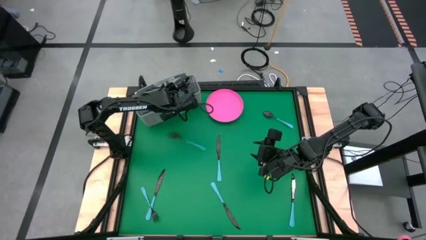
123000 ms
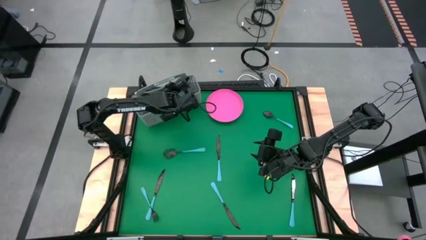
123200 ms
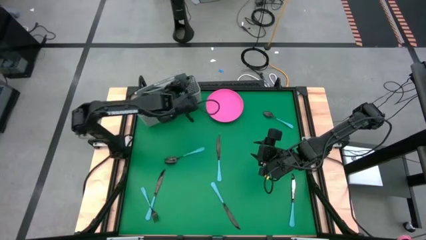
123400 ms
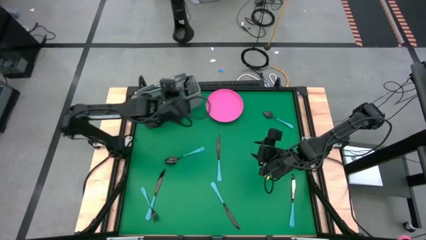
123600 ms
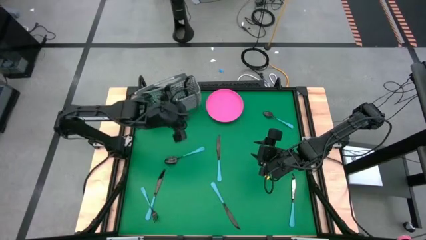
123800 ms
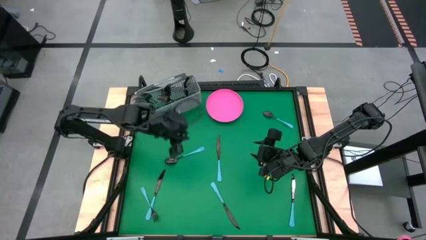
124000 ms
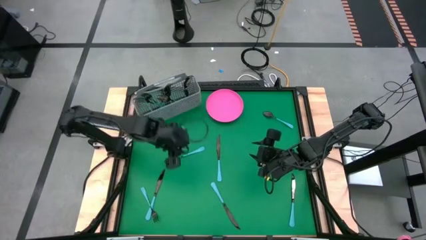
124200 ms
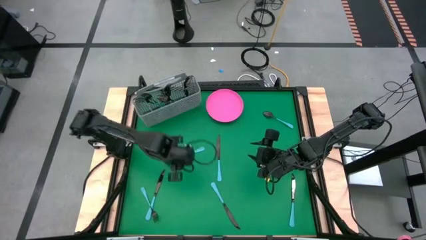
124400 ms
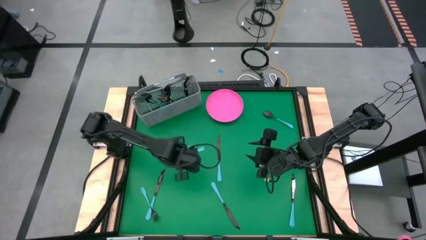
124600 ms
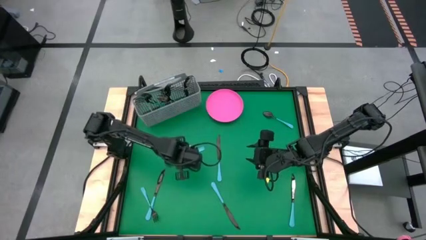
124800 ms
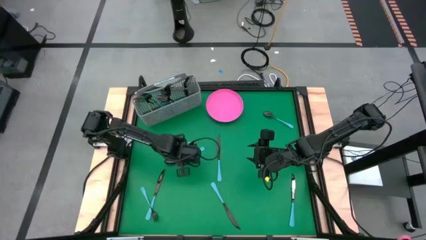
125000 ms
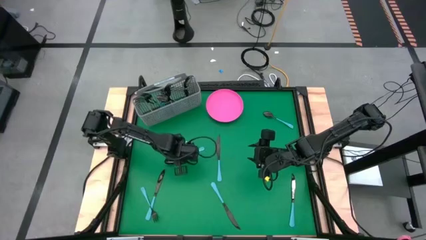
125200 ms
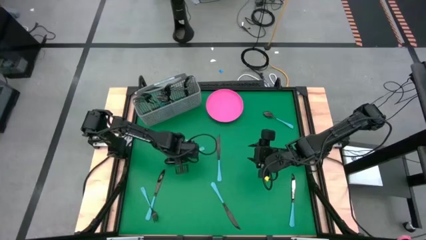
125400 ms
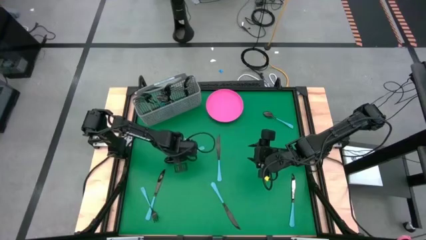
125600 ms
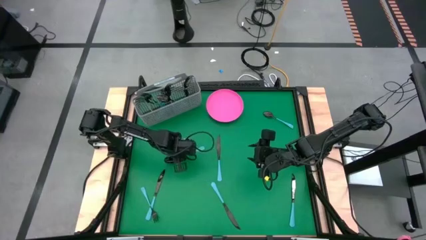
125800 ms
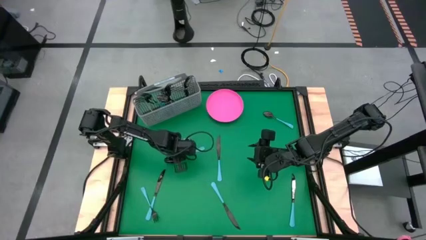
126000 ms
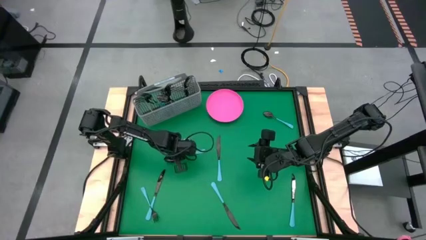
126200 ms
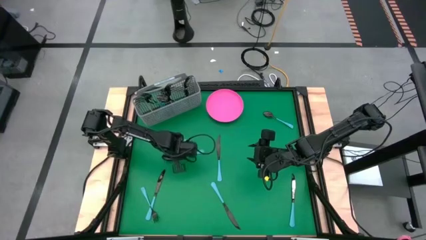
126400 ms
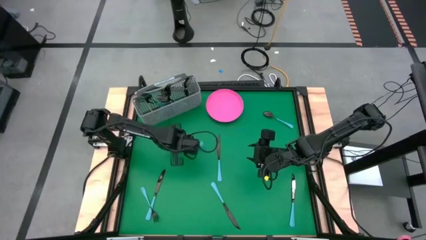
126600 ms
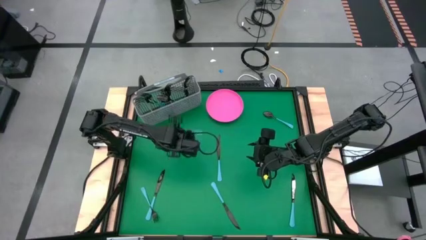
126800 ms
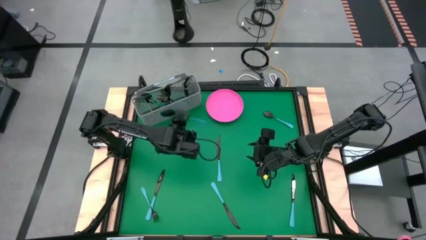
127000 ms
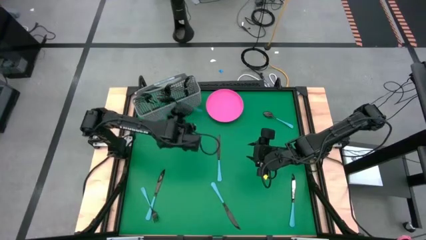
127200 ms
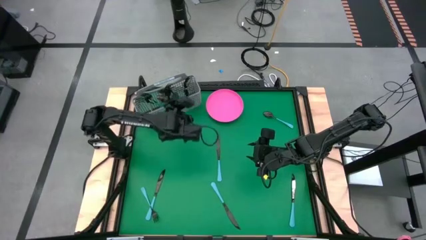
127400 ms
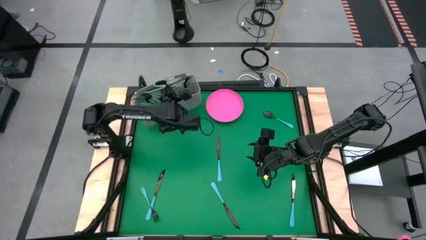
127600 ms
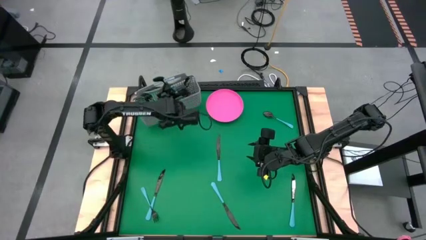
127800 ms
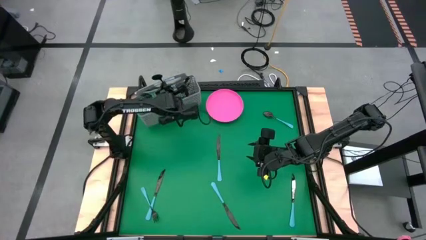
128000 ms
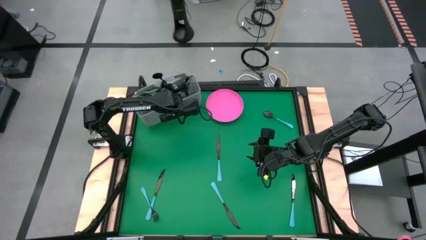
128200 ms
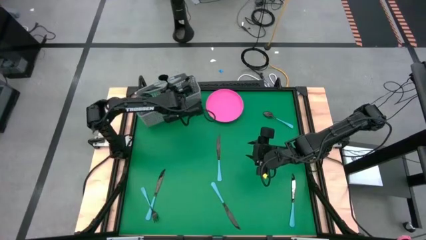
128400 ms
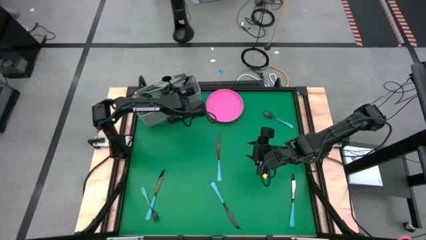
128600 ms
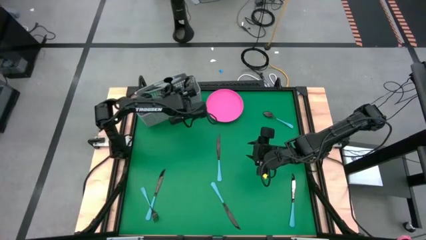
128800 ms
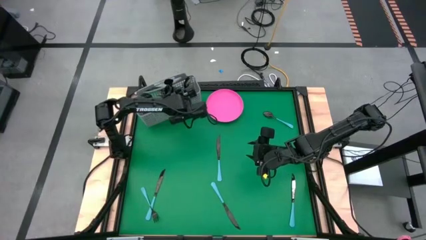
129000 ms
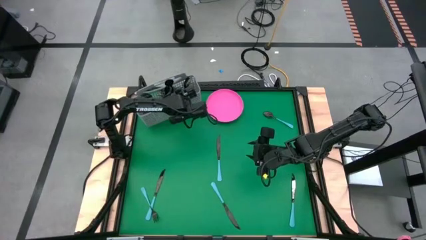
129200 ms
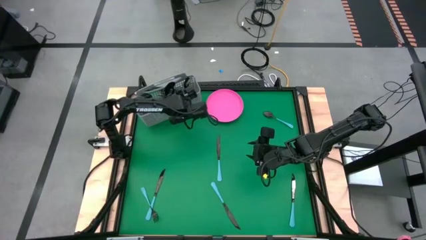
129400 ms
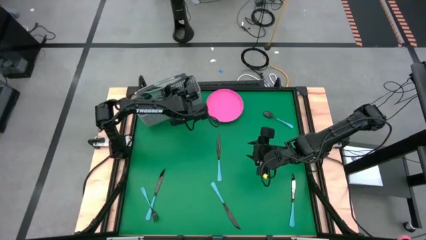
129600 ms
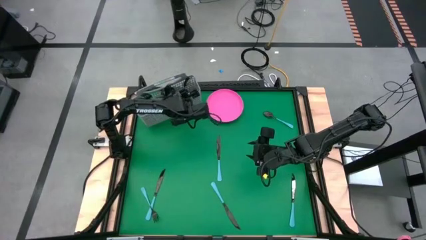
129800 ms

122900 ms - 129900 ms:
Task: Sort silverware
Put the blue spoon into the gray silverware holder

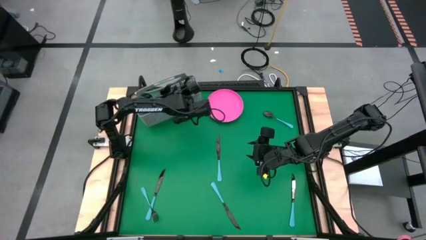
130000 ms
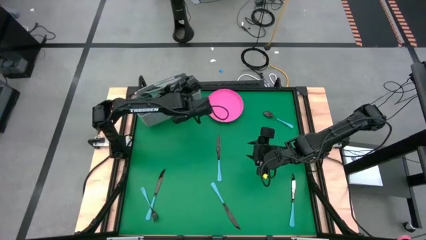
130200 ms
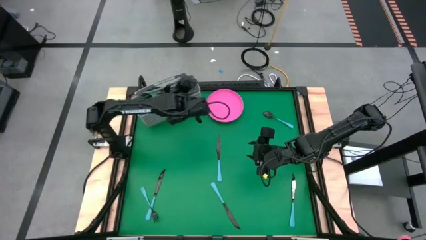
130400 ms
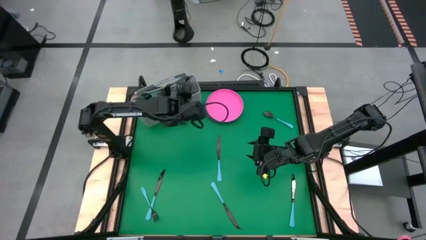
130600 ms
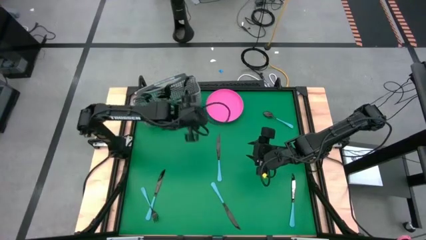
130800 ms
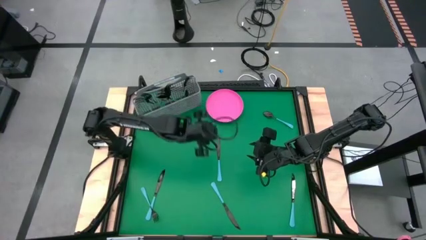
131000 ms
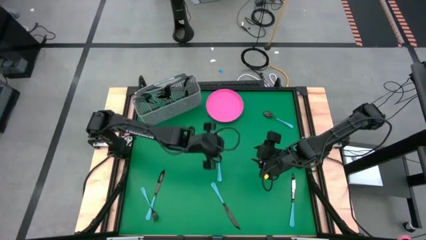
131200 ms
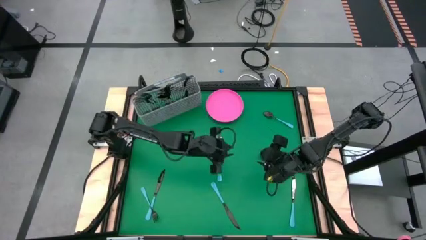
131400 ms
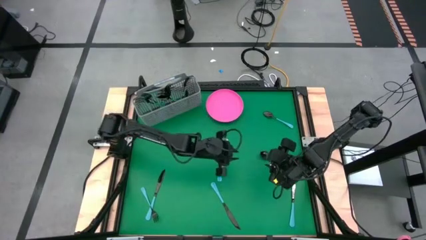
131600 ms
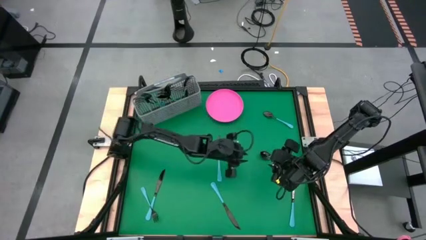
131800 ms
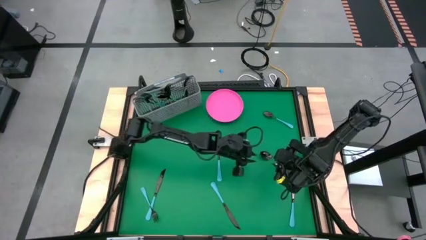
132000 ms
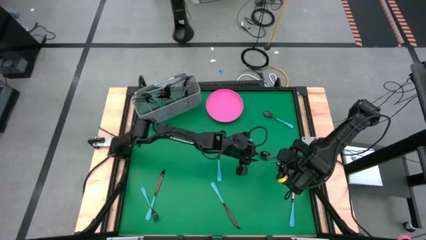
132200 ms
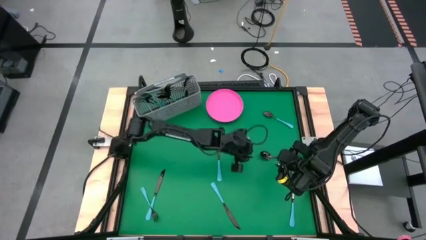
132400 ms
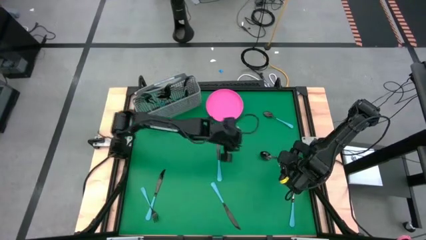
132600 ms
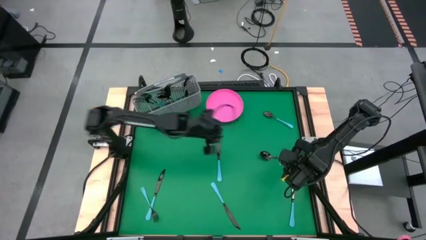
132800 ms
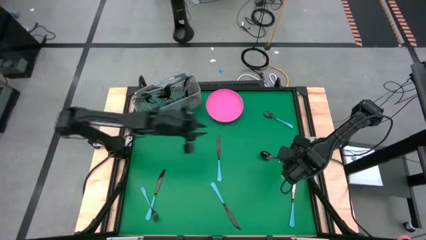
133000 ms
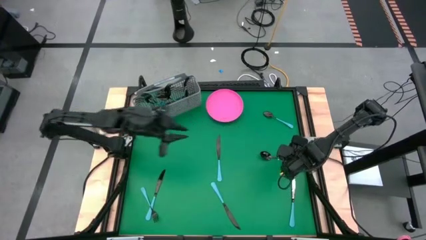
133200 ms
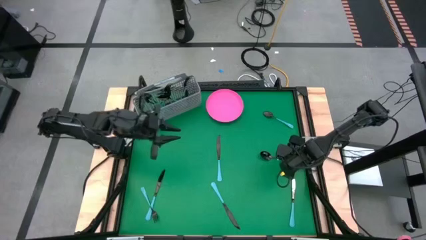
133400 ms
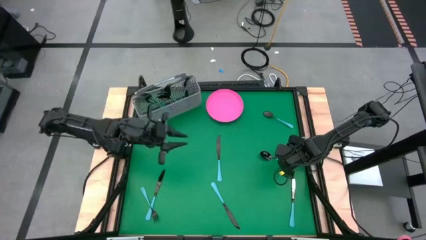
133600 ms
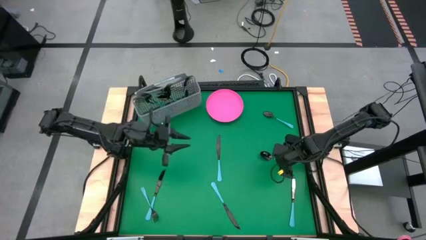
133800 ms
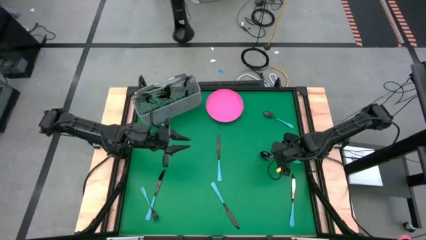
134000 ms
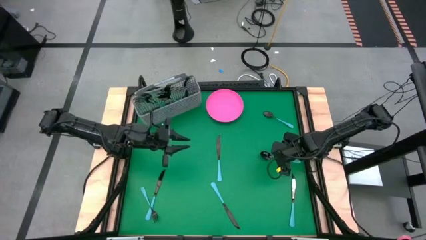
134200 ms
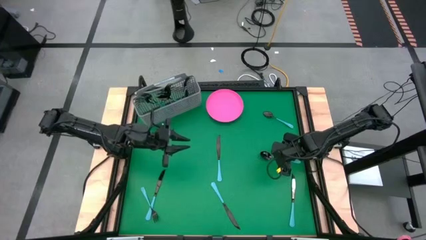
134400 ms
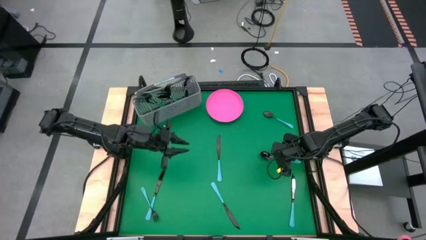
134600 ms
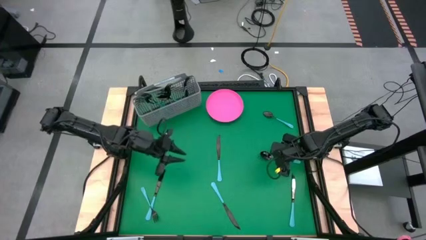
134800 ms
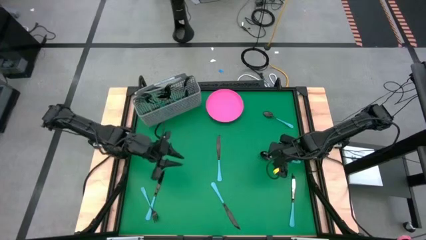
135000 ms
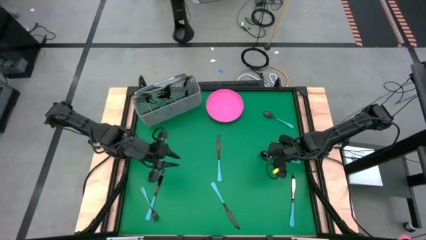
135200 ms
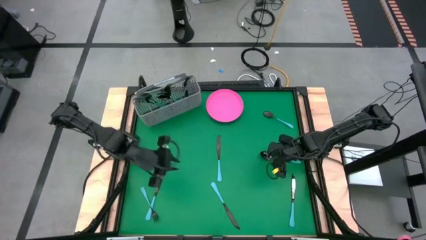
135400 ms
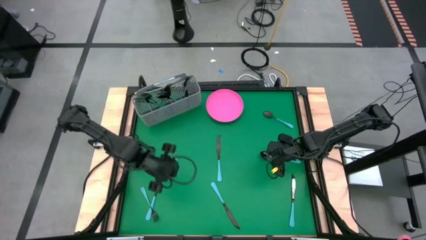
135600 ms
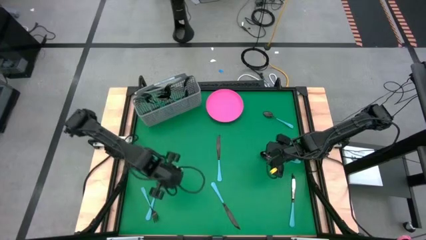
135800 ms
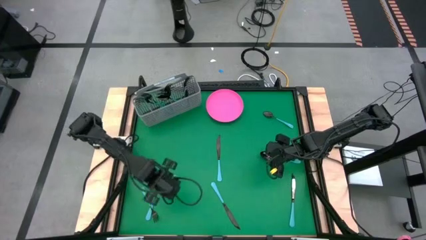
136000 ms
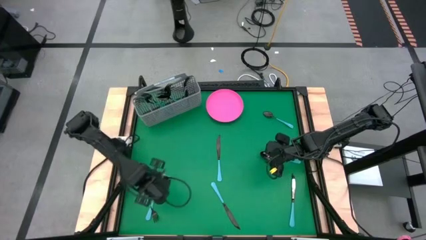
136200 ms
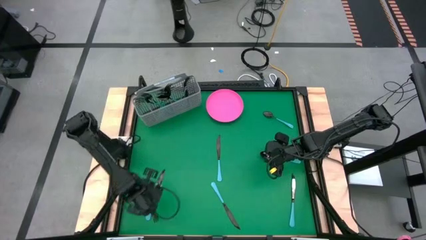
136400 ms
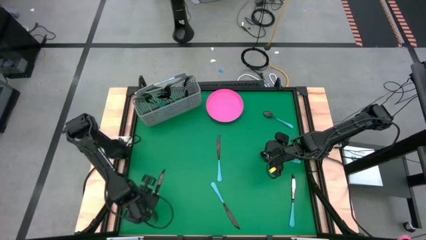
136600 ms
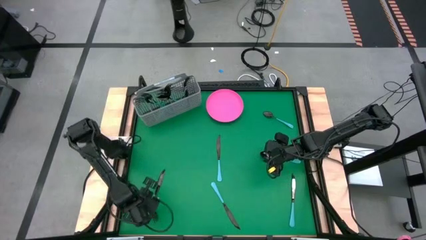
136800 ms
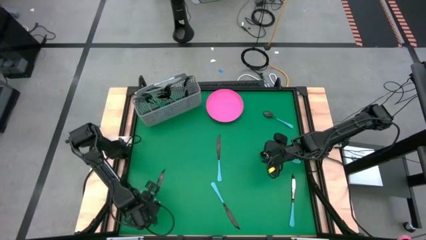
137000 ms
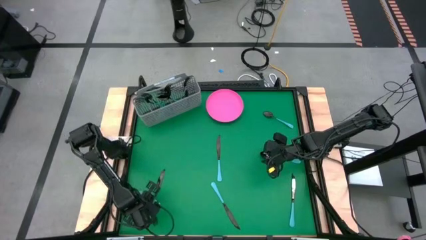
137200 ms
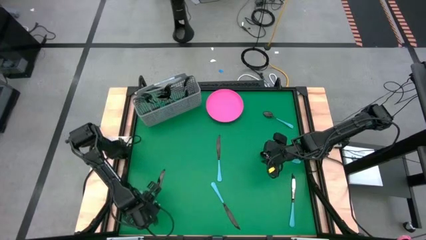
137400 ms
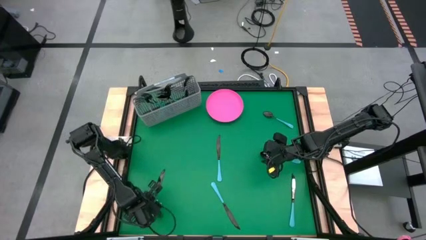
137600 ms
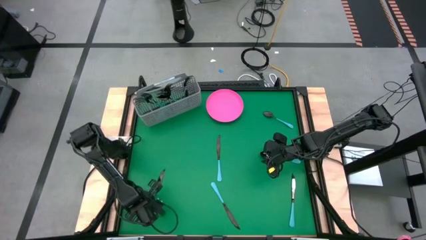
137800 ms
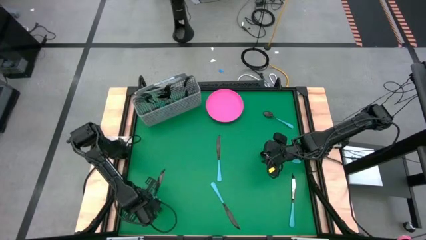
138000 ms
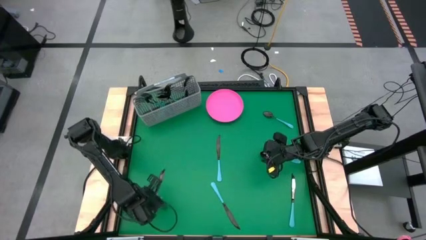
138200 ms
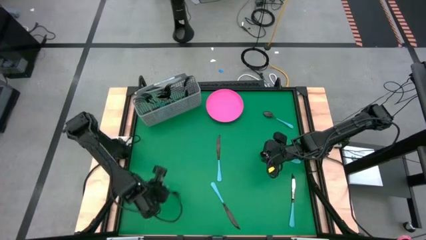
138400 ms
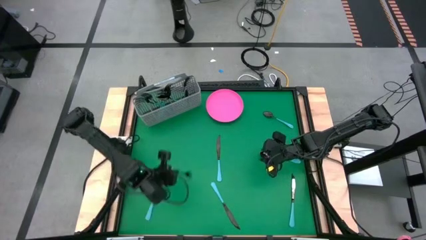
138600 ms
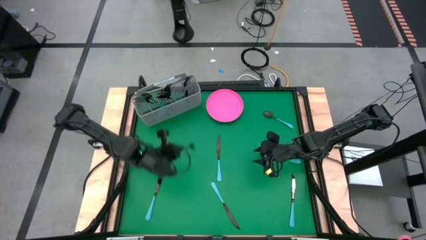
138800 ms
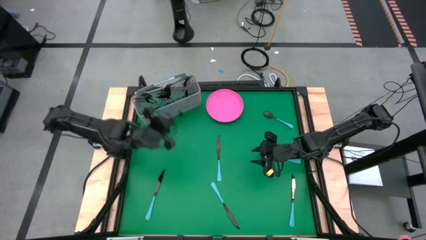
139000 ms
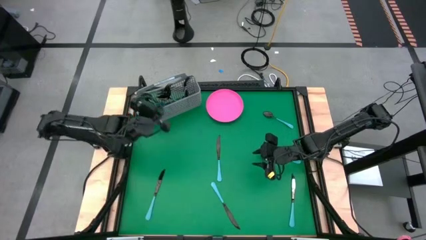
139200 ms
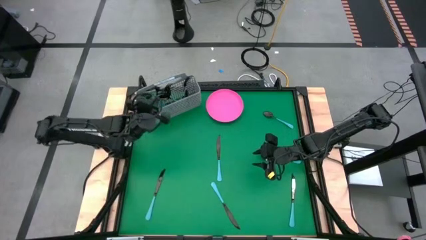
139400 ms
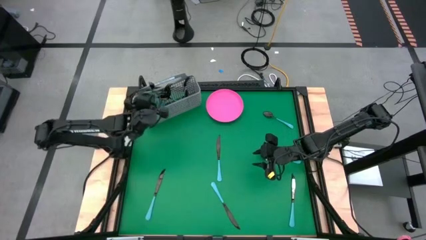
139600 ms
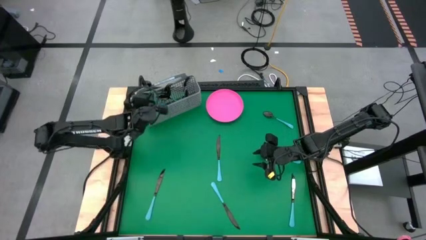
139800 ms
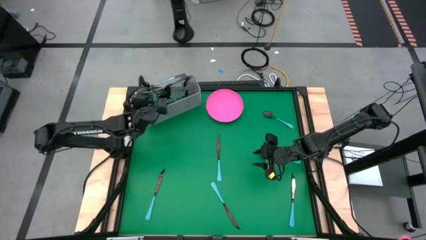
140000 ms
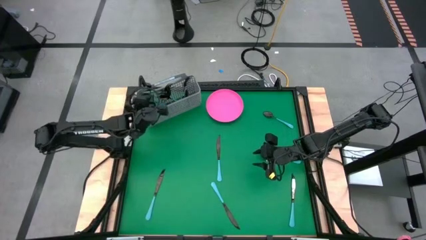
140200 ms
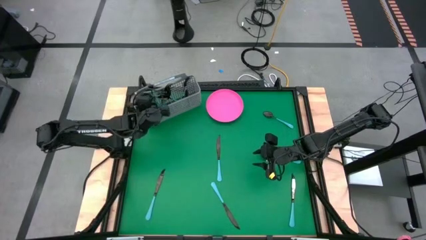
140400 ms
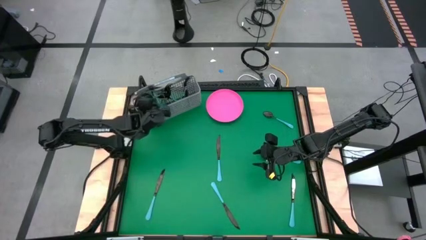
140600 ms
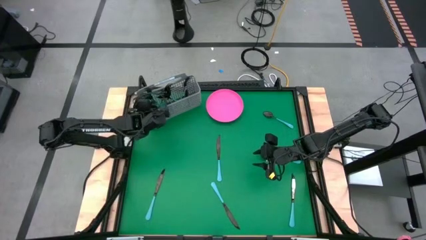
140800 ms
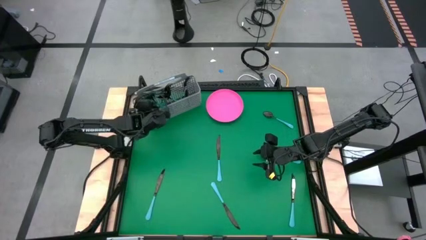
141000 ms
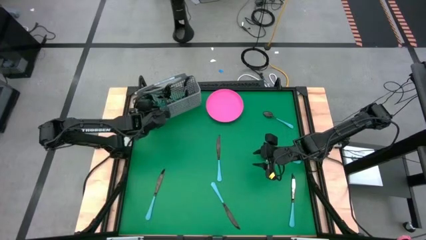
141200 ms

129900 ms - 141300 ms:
Put the blue fork into the gray silverware holder
